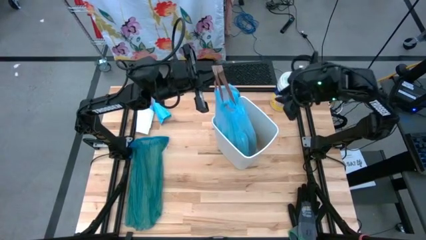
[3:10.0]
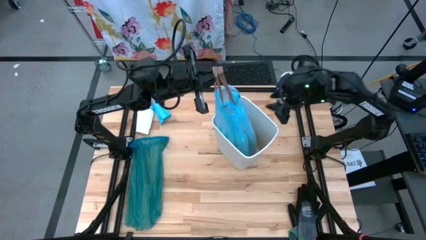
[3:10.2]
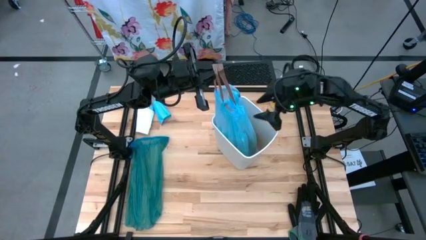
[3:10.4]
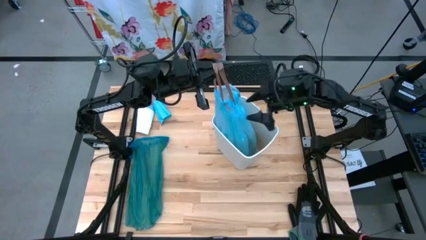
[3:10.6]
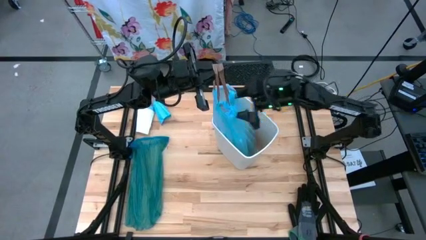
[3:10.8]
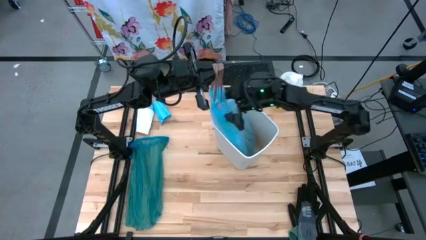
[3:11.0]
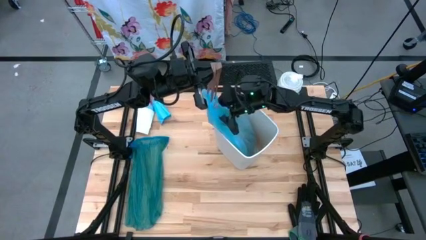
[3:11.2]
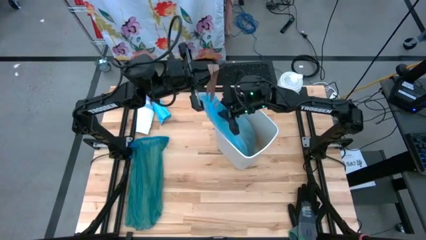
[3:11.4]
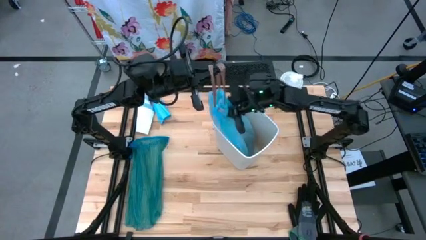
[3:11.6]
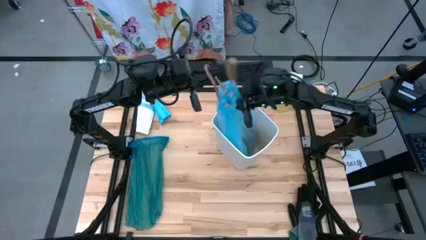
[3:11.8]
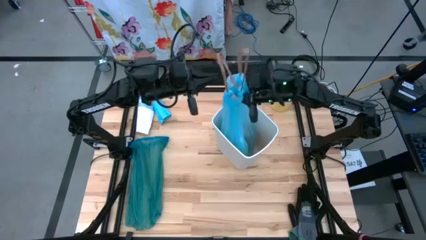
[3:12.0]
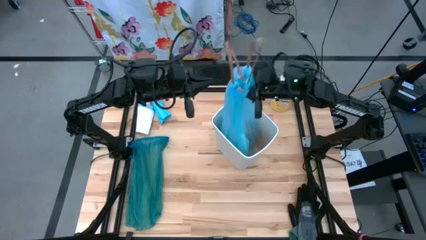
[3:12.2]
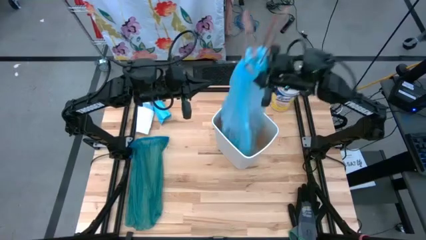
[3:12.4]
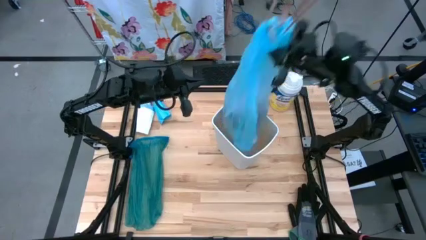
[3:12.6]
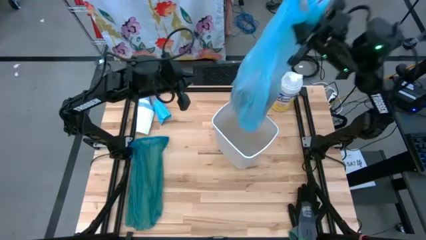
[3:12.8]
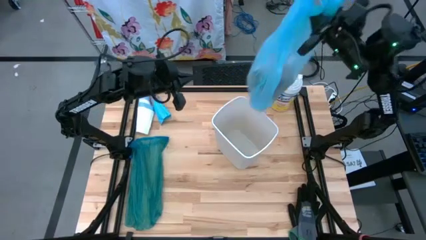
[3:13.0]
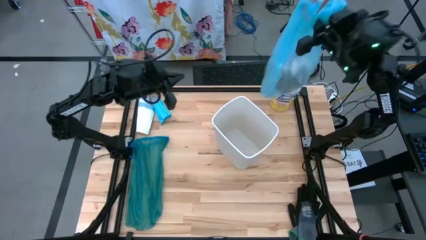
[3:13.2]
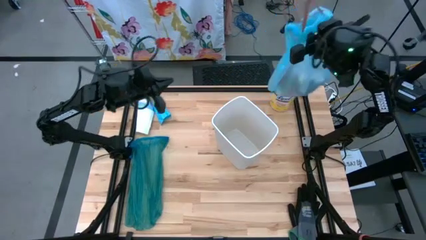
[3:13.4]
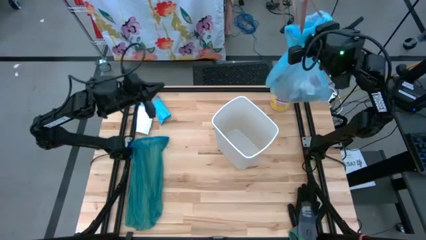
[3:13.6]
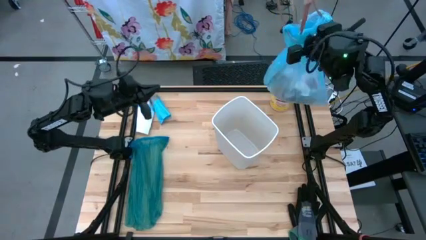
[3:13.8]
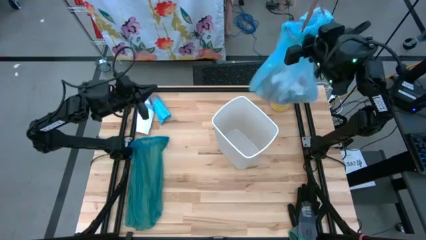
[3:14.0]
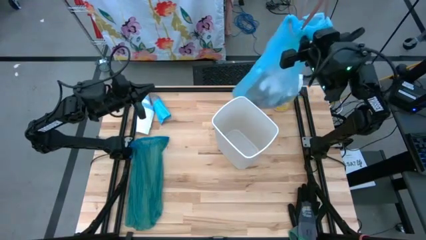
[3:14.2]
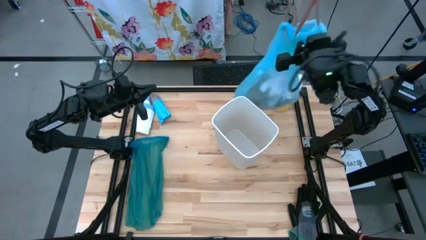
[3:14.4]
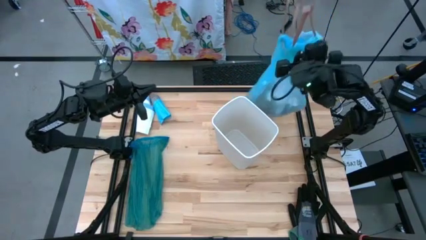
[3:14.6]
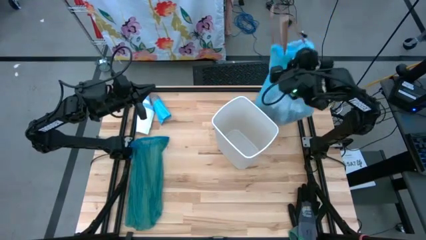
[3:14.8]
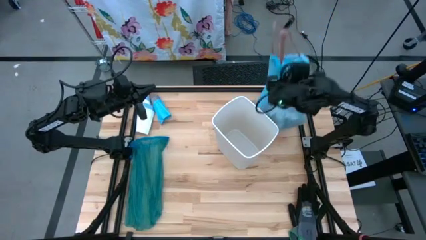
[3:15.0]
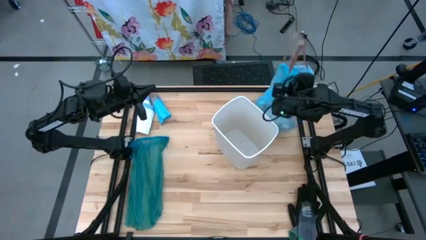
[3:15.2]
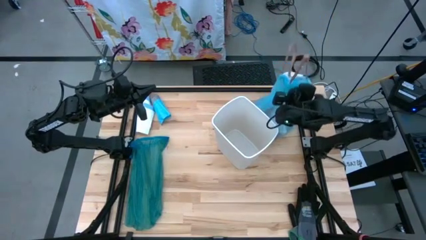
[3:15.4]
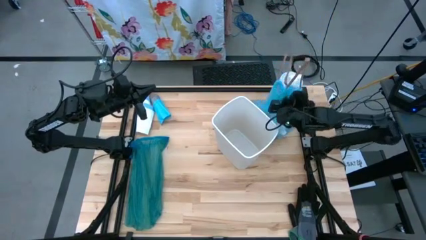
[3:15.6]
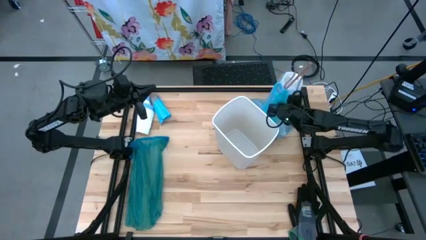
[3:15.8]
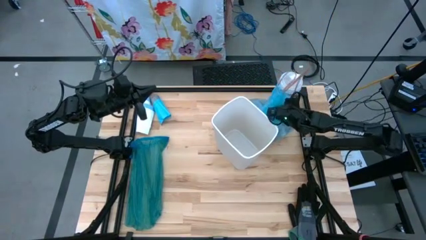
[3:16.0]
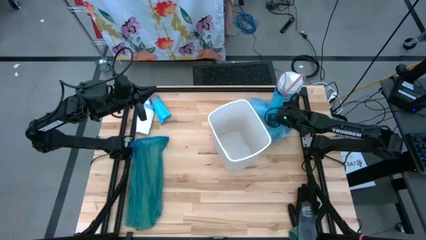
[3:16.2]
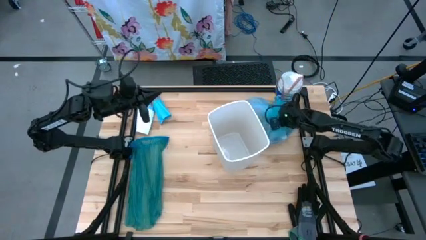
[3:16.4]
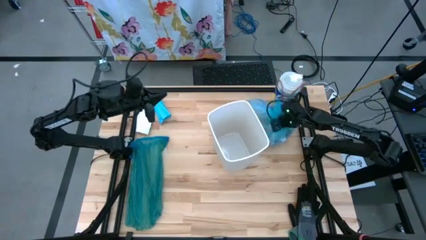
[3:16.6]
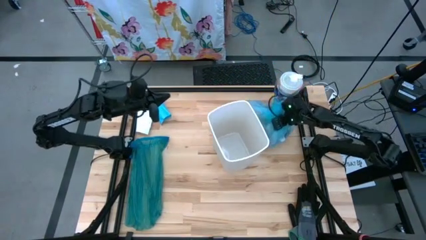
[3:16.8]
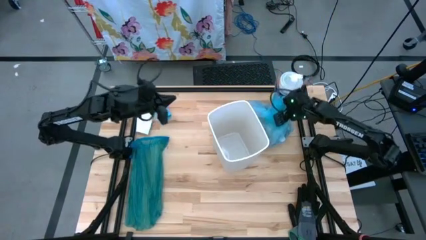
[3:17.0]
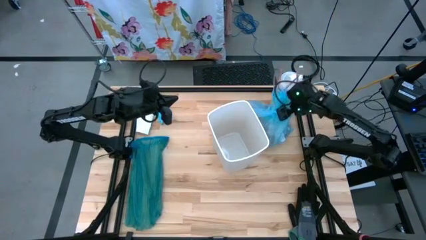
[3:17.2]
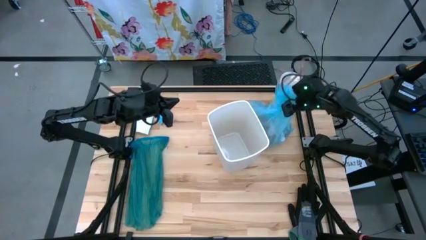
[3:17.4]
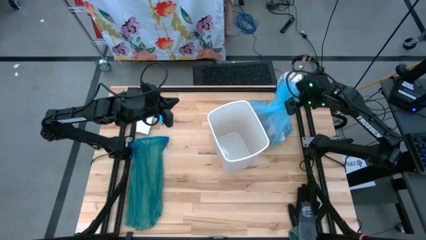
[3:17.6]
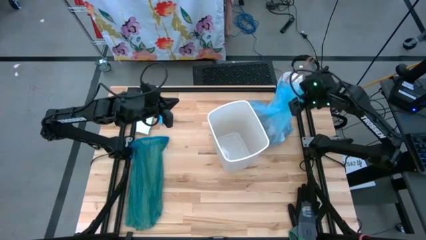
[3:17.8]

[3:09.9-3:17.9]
Task: place trash/remove bag and relplace
Remove the blue trash bag from the trash bin
